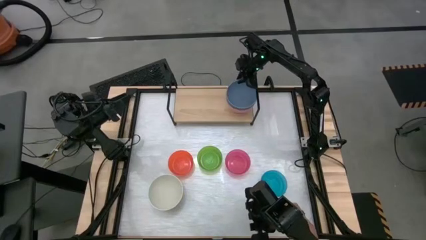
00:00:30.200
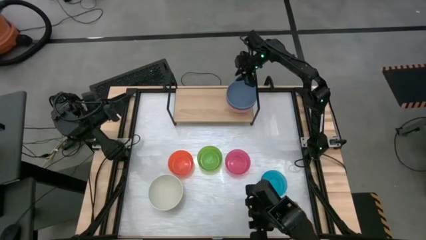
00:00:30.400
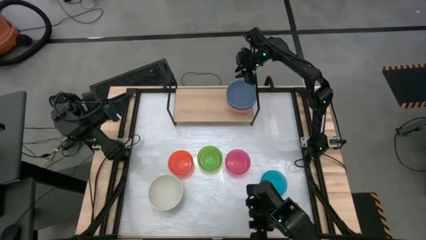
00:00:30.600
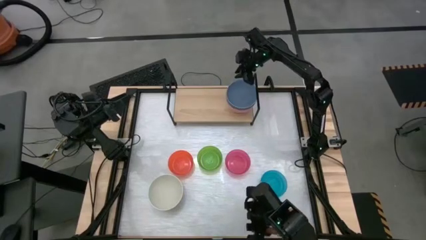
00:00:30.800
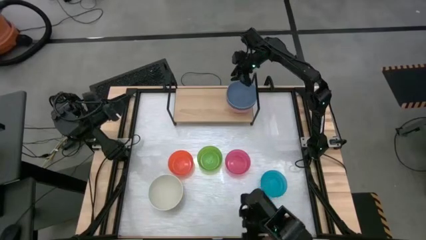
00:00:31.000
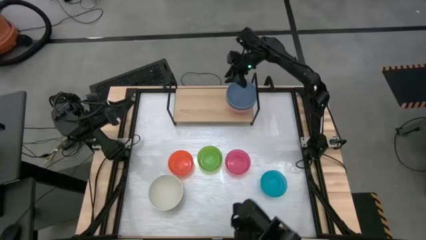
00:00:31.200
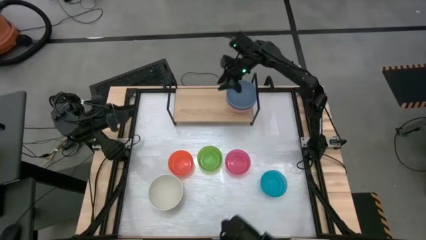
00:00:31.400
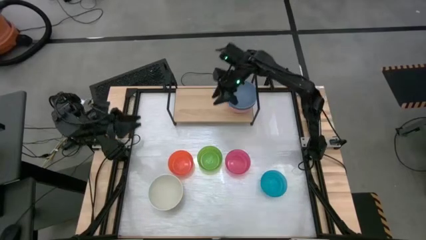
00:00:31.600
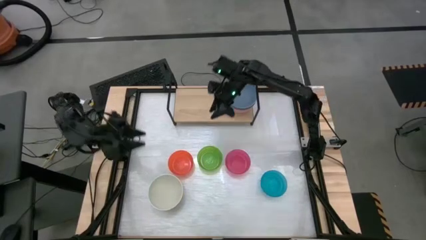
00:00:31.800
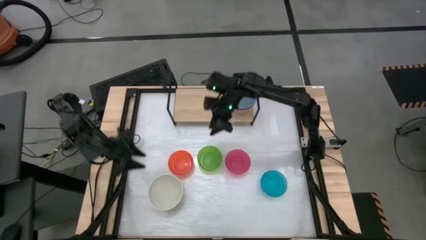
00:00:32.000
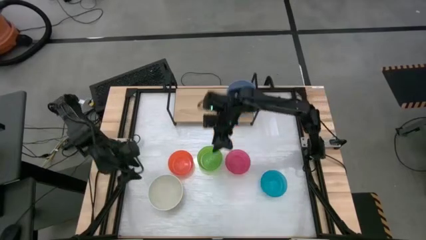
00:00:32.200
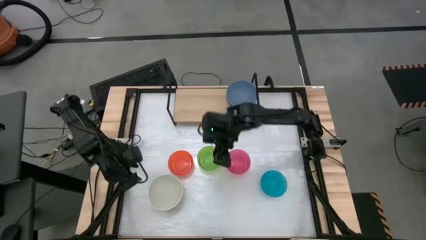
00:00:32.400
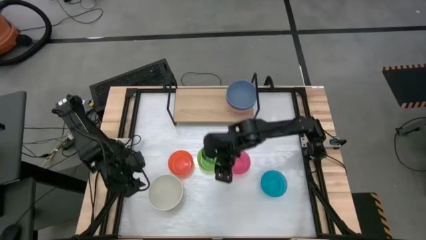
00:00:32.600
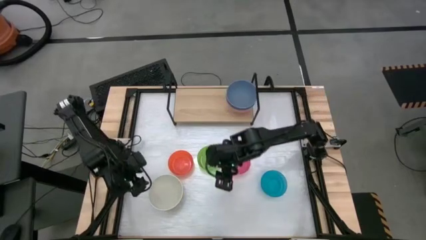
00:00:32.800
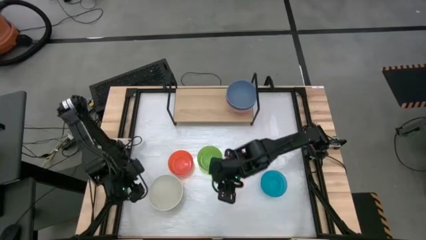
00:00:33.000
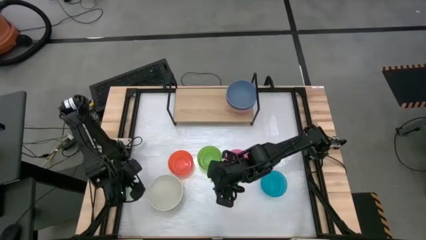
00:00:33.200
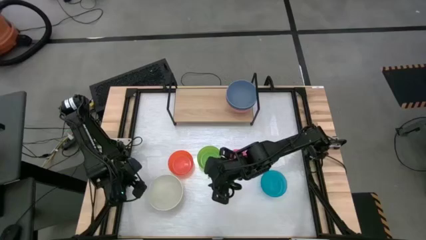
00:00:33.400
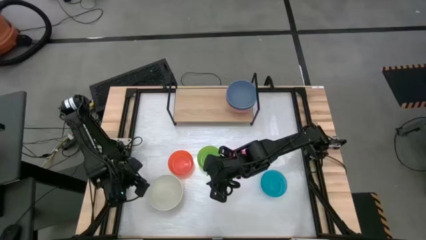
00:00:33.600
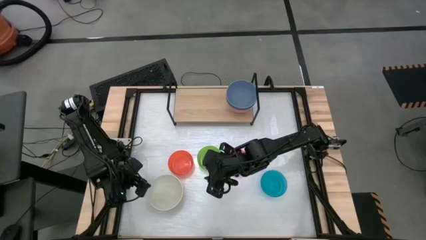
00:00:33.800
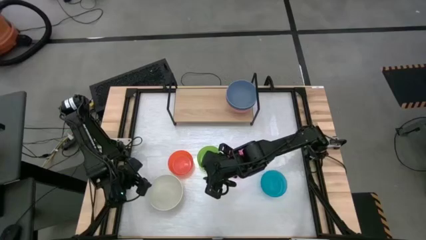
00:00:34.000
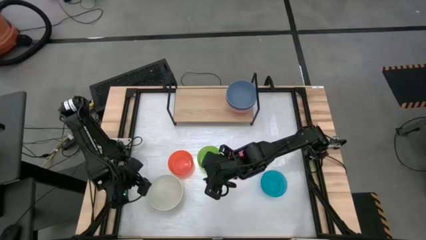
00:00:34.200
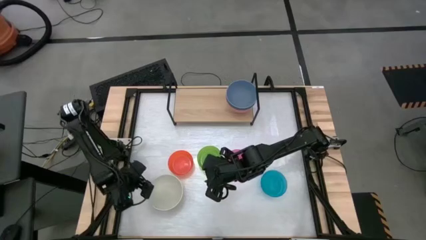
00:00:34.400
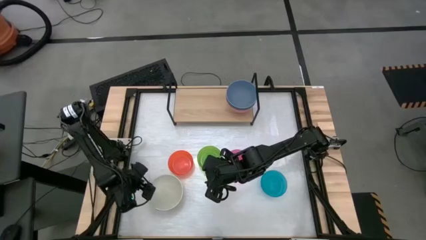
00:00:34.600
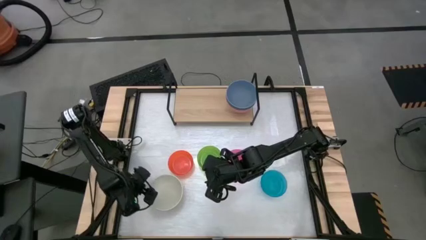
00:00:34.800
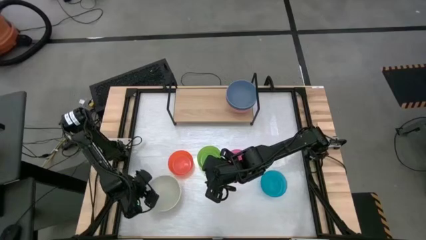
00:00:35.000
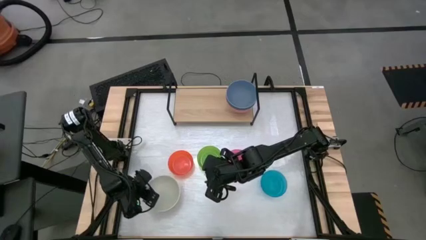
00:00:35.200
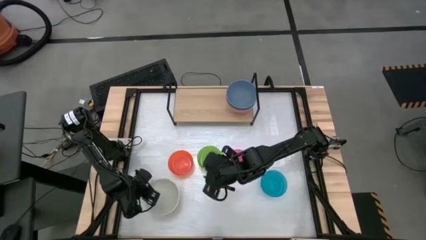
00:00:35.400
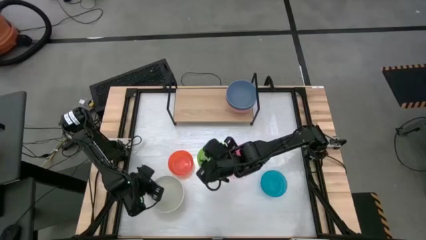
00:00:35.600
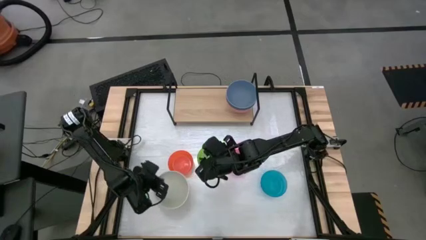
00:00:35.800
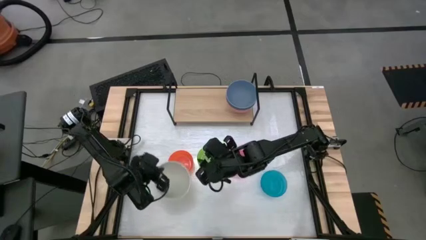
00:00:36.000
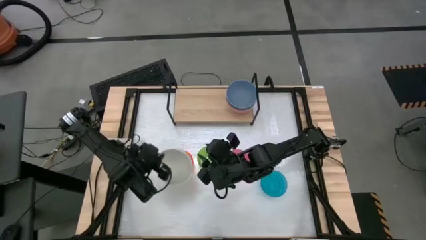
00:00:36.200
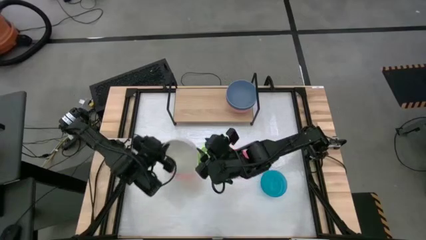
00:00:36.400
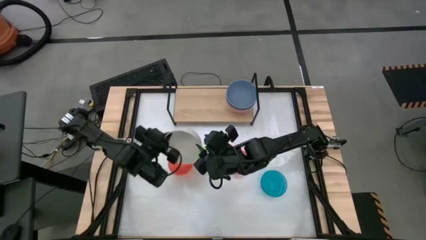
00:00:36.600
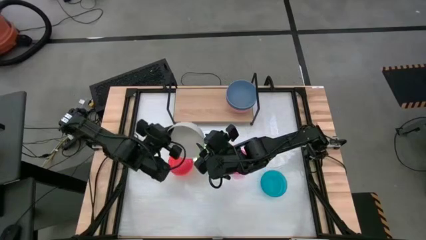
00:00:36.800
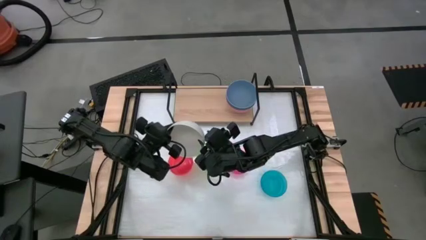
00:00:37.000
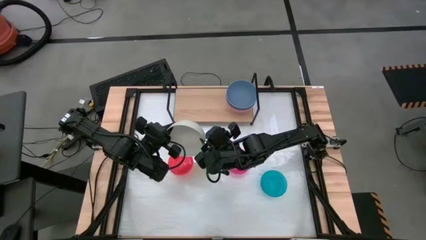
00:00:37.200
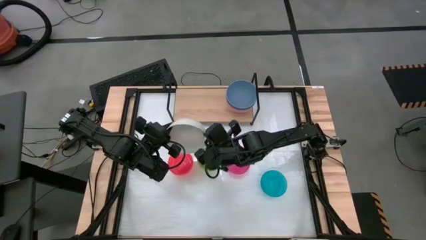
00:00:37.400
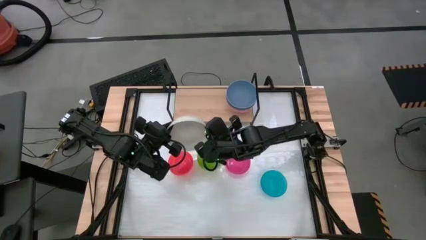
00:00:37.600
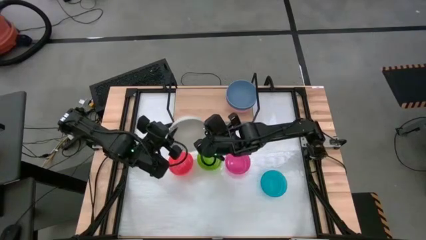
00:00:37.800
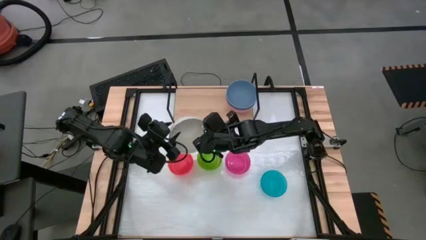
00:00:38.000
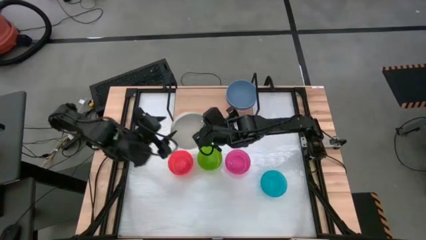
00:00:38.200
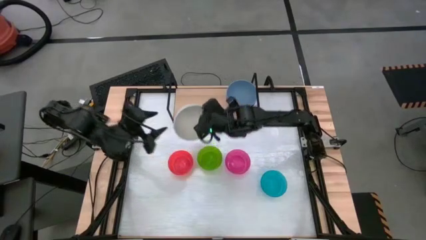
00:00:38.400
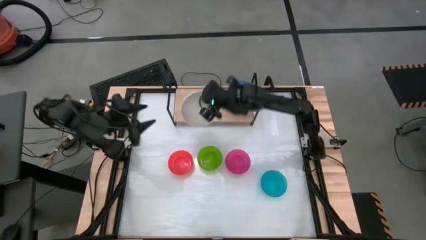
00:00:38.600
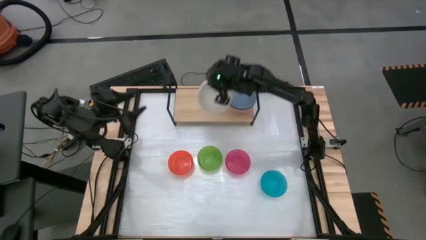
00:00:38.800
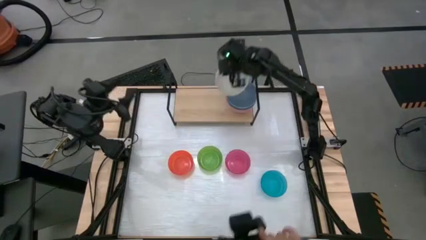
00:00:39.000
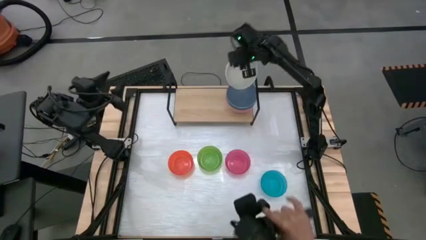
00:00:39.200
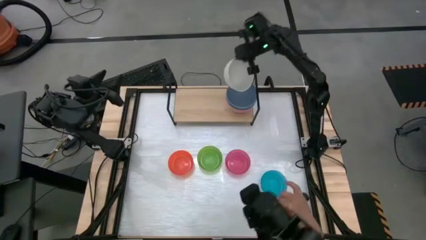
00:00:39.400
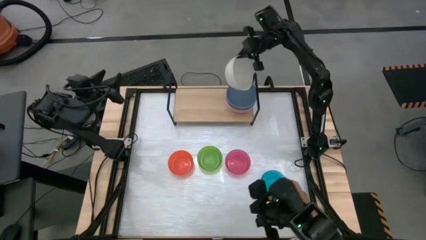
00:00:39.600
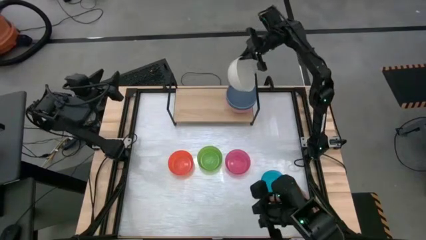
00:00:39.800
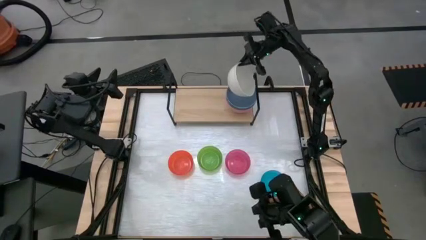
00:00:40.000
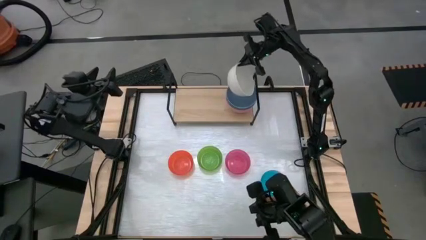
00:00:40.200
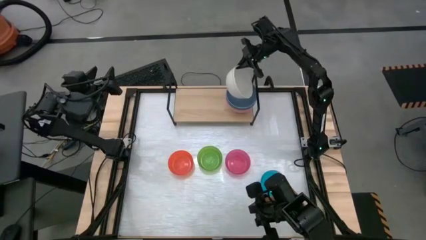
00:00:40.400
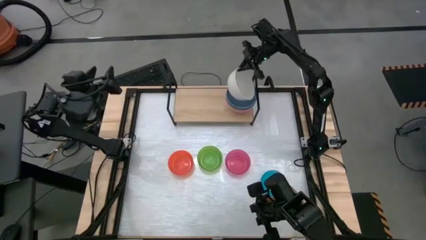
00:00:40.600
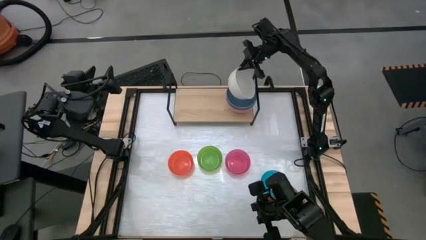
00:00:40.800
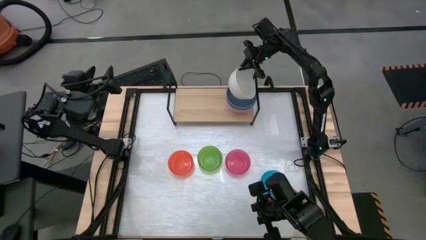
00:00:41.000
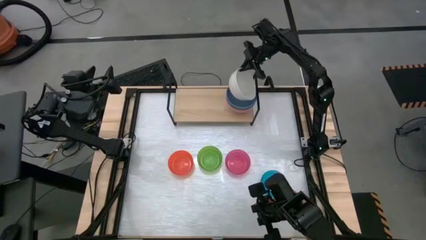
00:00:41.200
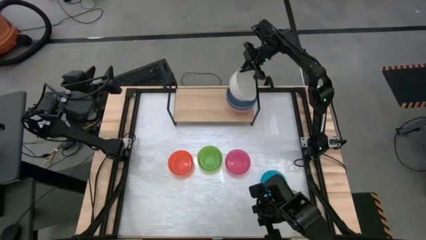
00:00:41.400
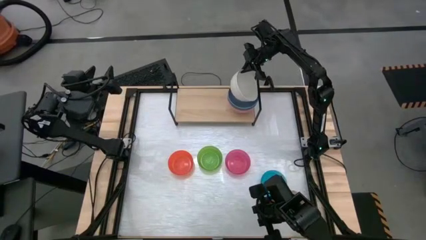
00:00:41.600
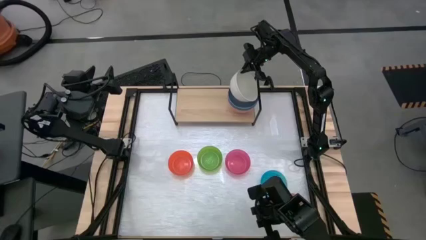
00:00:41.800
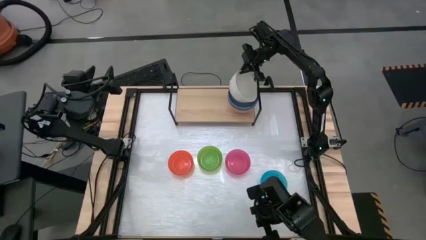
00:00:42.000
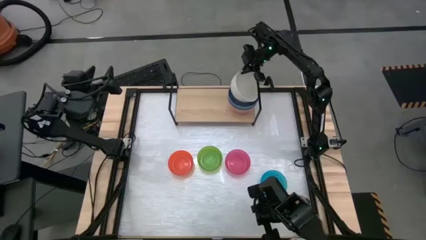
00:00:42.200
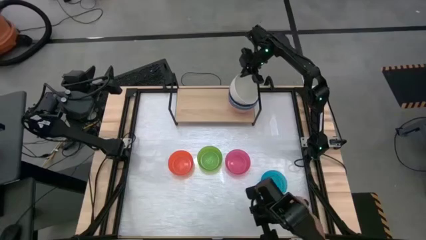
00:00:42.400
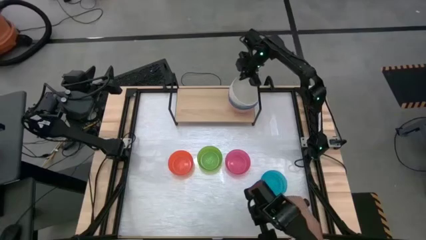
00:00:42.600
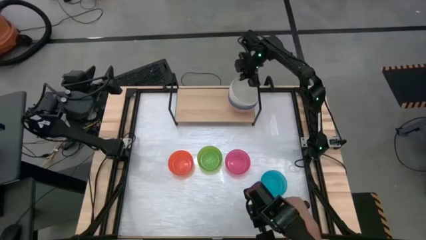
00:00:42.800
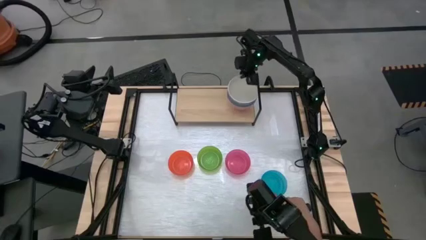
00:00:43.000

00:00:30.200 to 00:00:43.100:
Task: Place and stack bowls onto a shelf
Stack the white bowl into the dark blue bowl on the shelf
